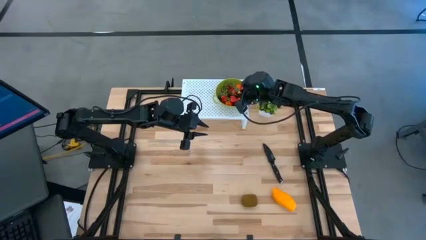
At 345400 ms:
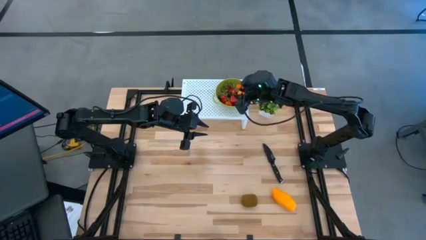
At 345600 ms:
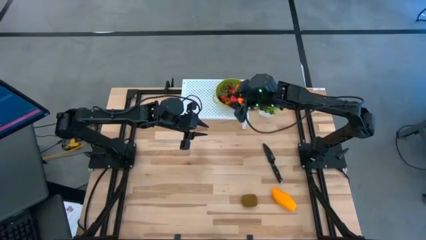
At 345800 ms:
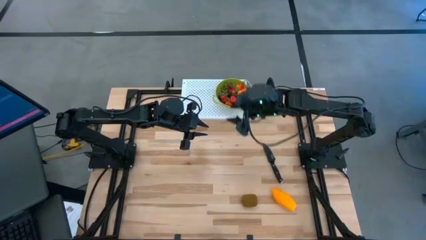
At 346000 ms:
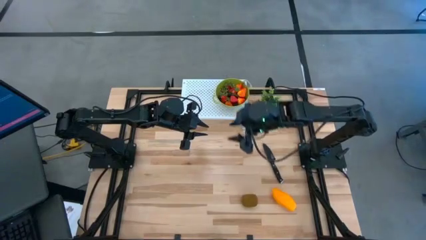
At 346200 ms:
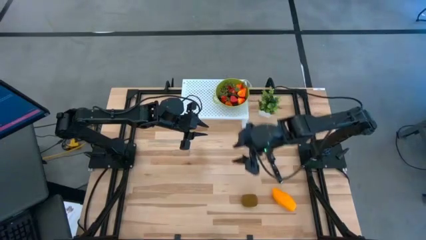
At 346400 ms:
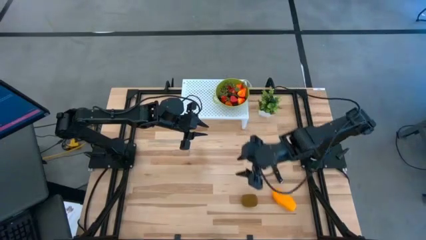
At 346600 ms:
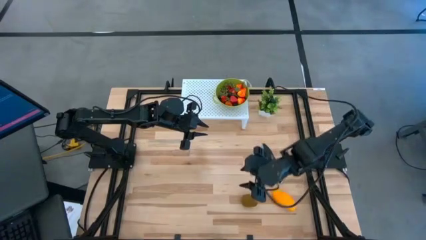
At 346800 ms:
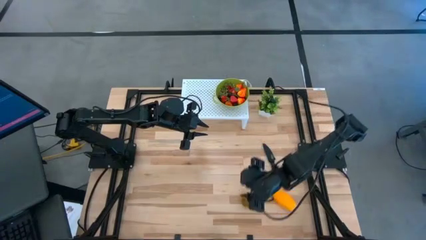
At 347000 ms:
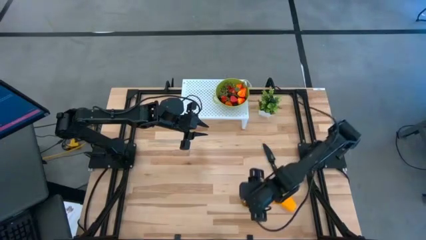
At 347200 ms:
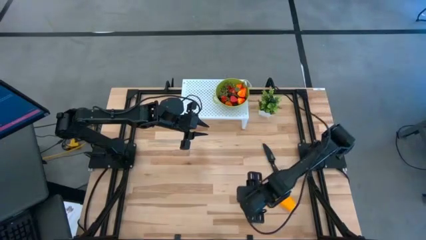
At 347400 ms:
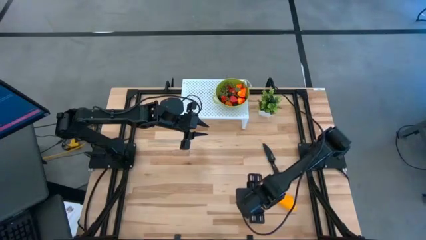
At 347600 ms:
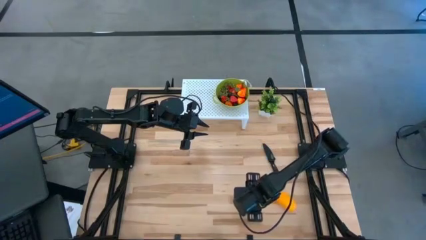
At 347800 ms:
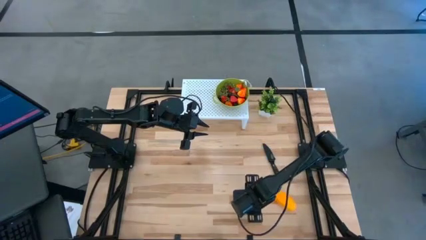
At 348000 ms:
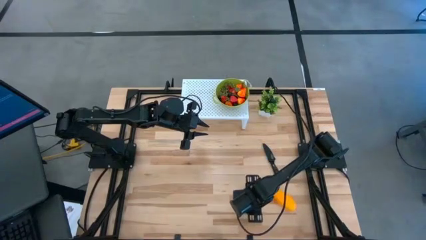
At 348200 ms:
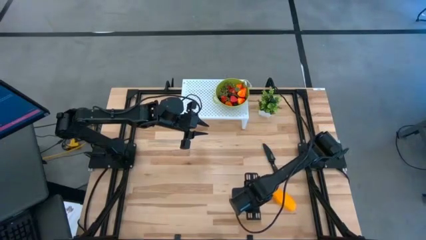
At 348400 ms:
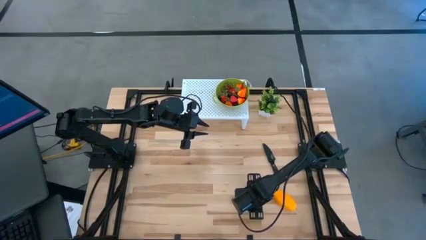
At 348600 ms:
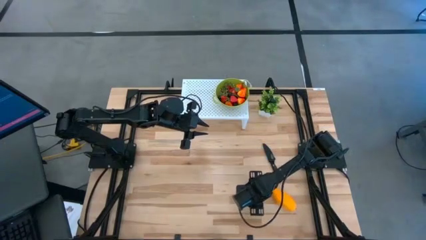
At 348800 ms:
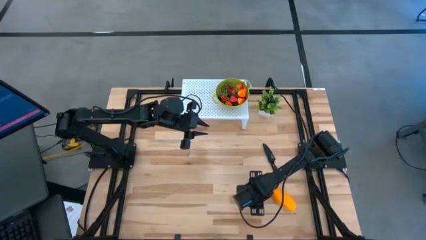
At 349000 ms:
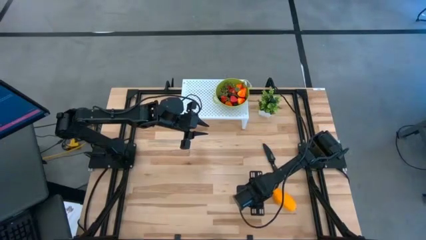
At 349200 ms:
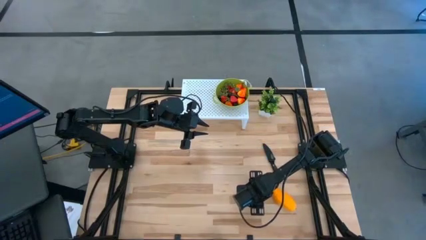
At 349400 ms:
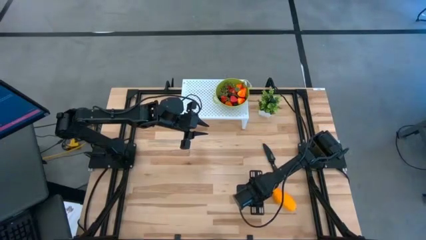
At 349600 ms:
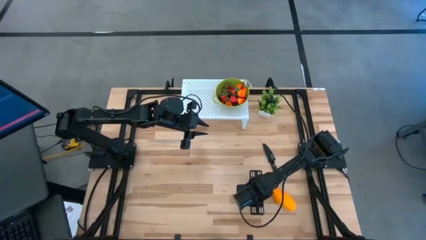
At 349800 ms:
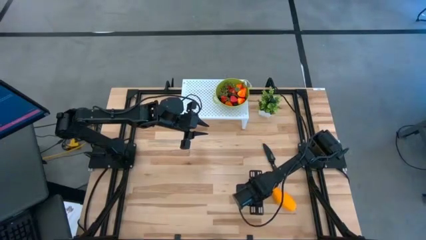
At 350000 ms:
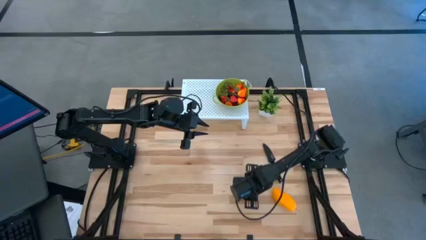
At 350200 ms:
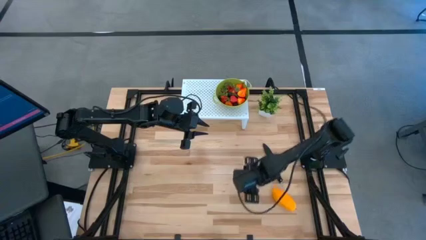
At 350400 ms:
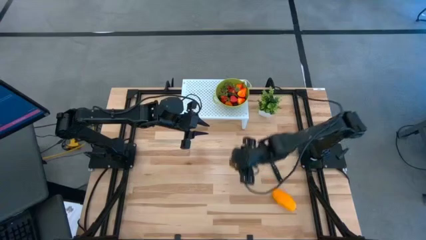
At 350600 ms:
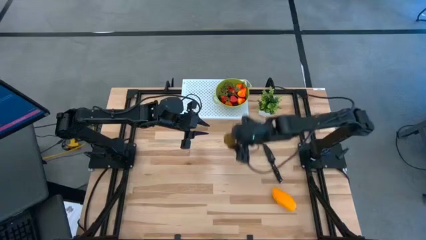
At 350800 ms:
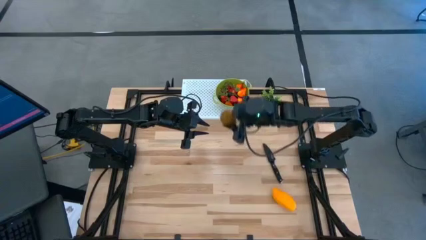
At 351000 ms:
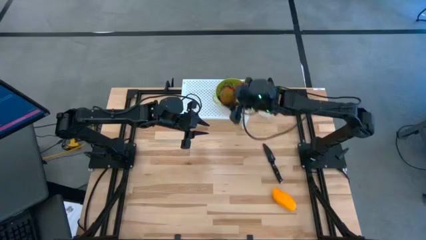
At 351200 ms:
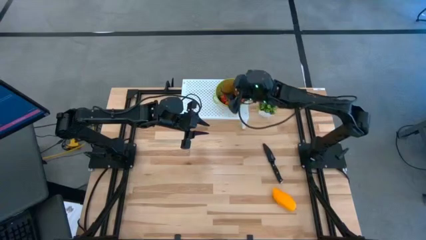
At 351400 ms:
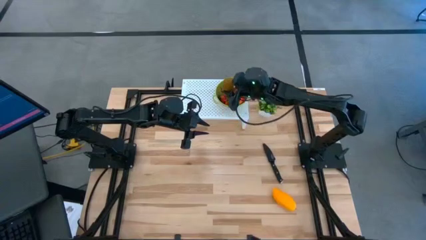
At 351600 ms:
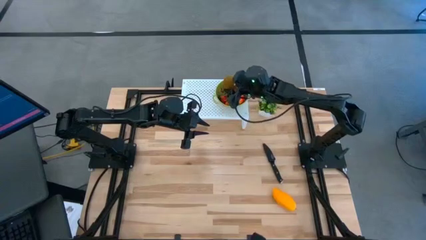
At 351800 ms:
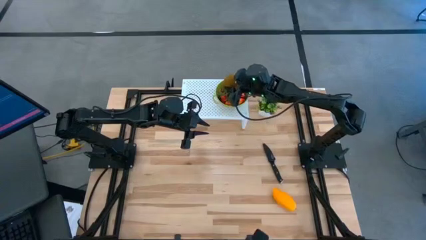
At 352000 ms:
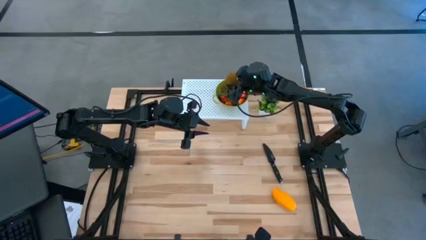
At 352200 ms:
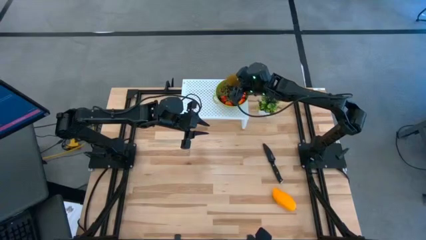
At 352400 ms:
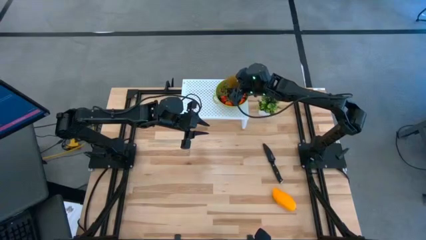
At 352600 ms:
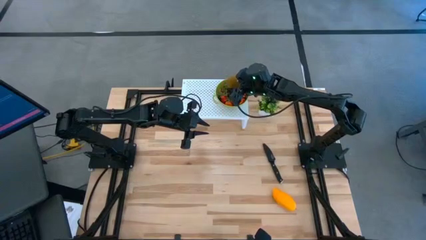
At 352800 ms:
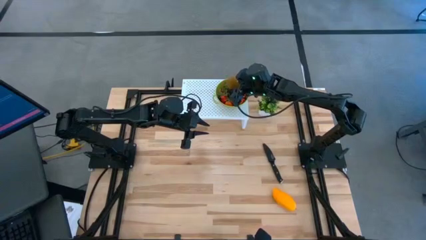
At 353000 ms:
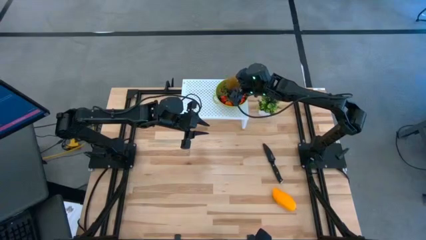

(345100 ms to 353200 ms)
Task: Pick & Place Fruit
Put the brown kiwi into the green strainer bowl

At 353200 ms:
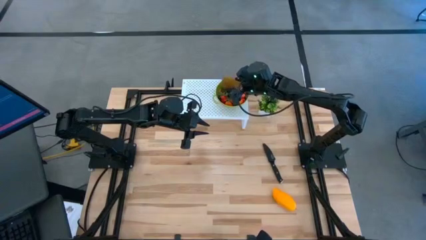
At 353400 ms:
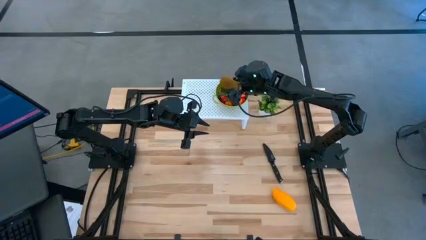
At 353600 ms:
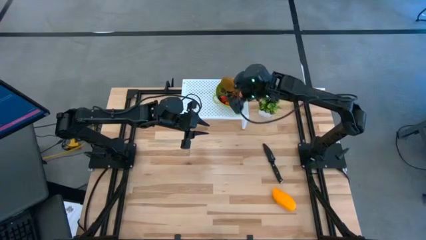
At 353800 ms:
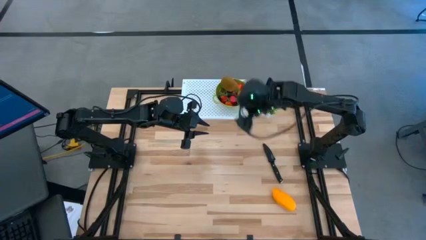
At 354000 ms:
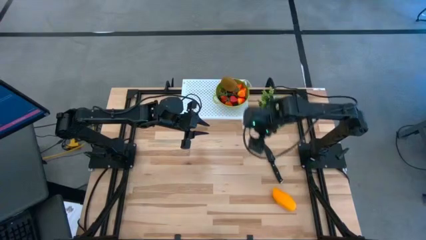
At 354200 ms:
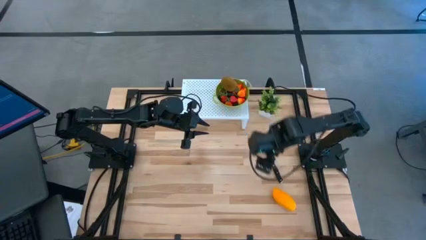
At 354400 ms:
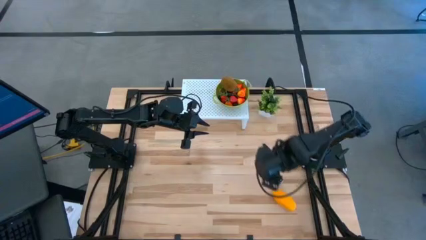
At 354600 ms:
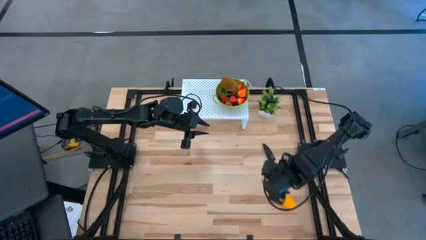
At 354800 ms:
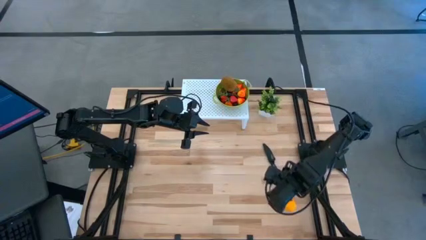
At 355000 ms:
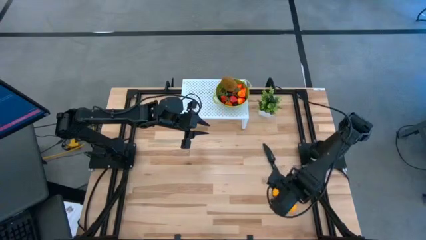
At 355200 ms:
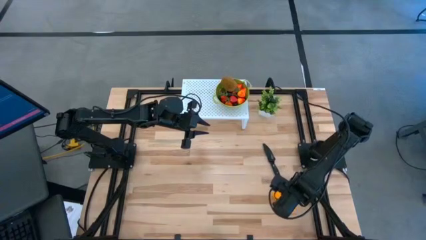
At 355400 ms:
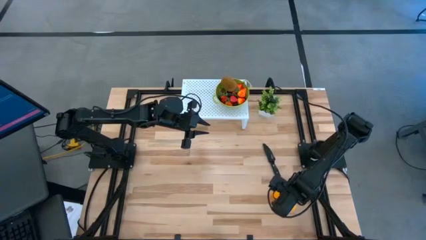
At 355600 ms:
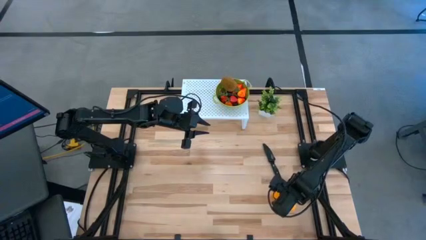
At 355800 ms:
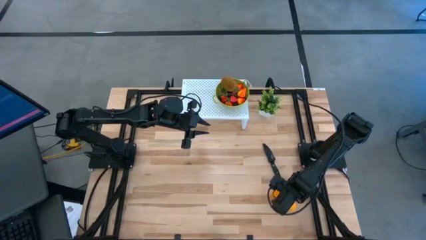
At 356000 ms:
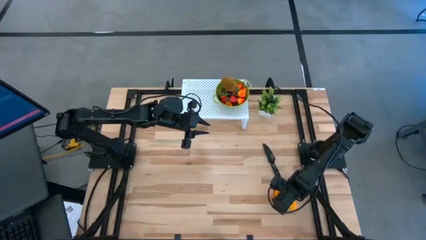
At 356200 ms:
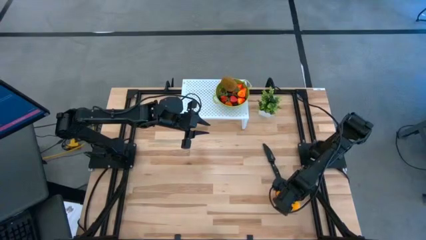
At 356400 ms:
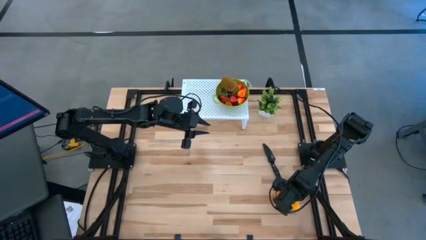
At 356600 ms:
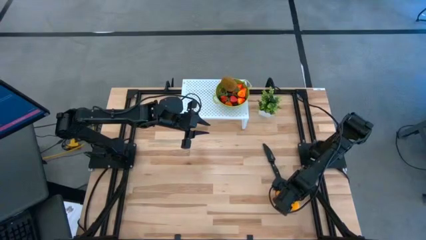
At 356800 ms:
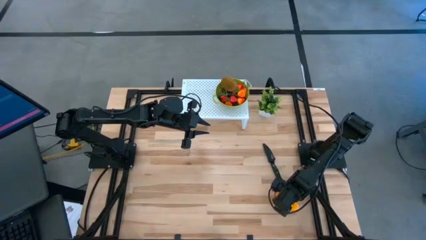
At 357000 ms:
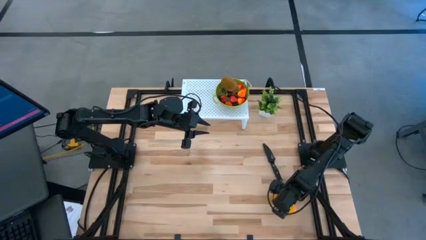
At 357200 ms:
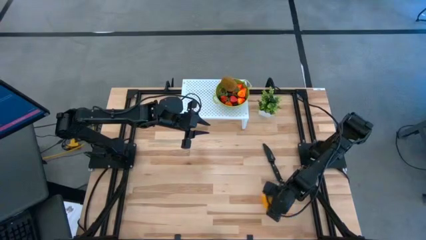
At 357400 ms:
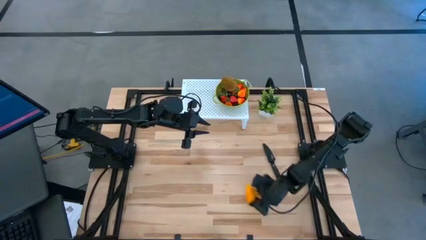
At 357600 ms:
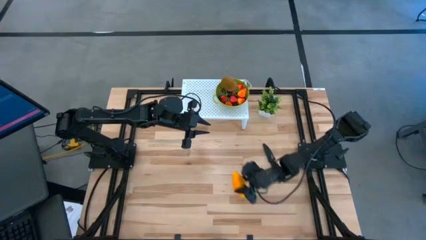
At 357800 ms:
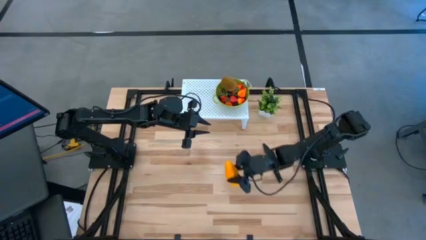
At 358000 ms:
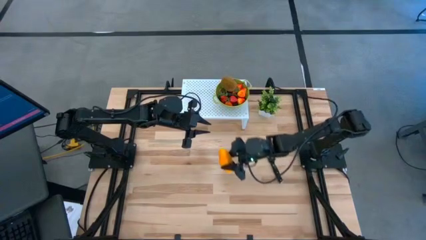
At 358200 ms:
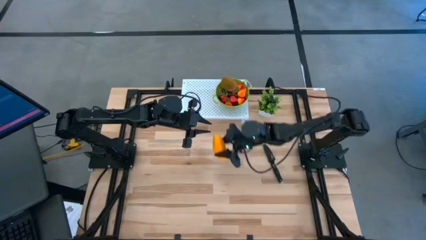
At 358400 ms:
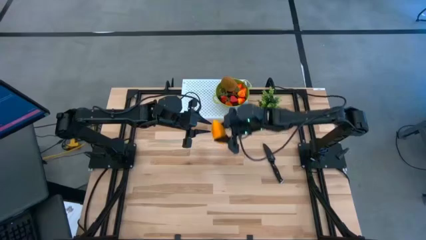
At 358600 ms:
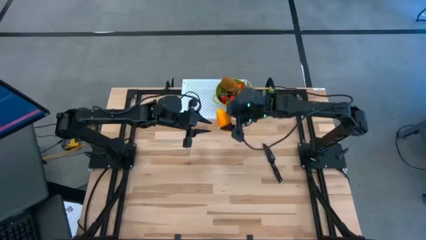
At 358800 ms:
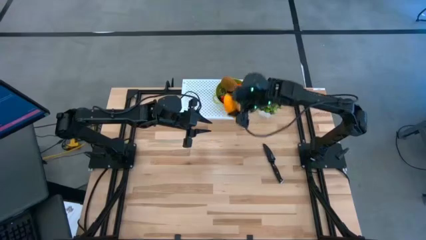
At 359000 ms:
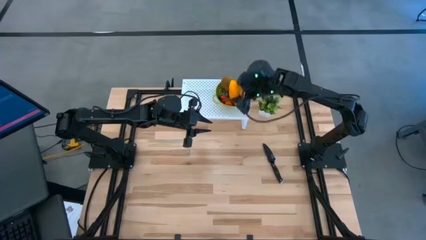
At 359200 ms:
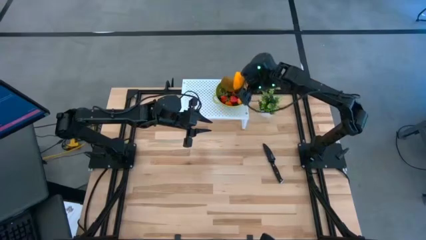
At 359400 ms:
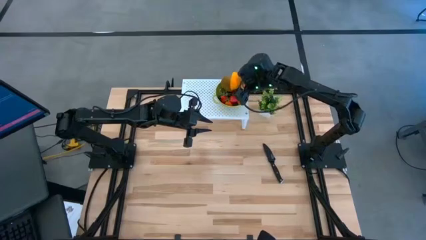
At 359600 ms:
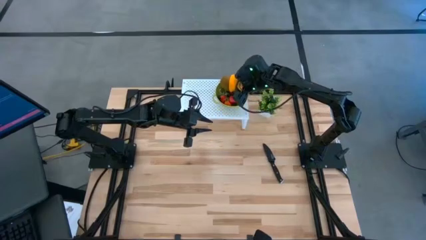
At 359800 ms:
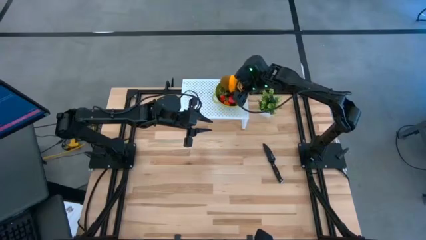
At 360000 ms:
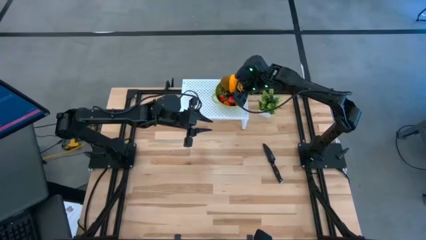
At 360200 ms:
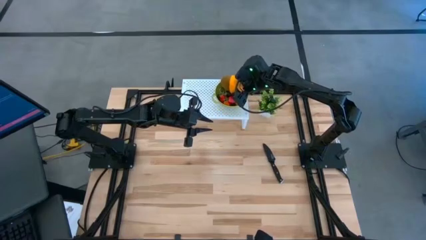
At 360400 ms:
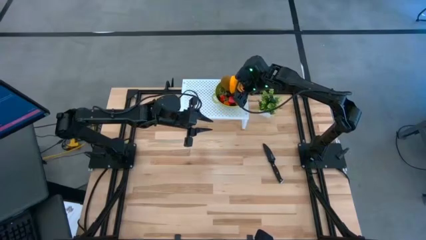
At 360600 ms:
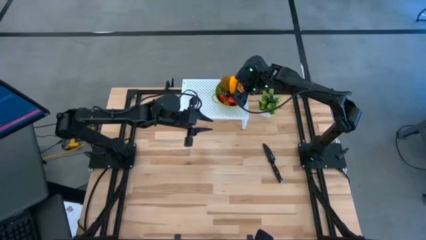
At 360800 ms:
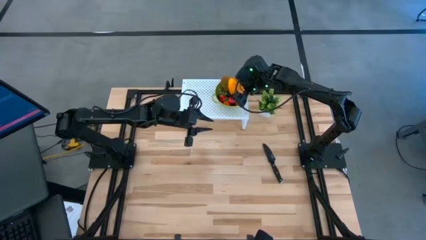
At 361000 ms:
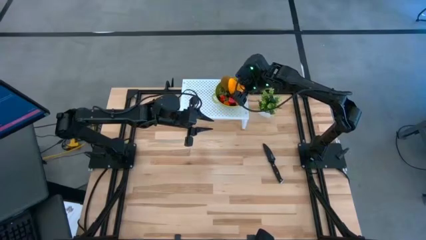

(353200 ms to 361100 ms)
Put the yellow mango into the green strainer bowl
